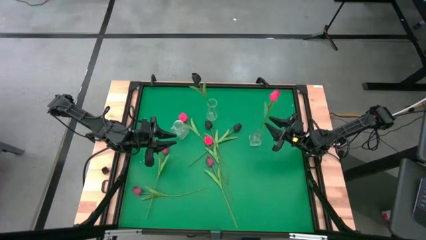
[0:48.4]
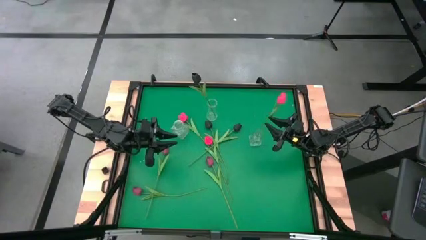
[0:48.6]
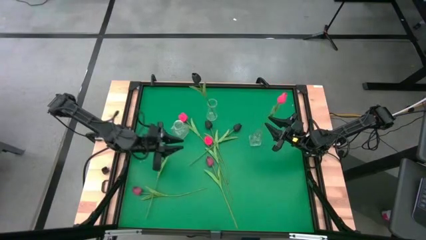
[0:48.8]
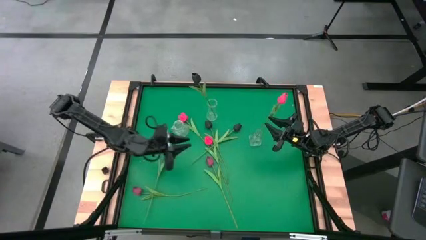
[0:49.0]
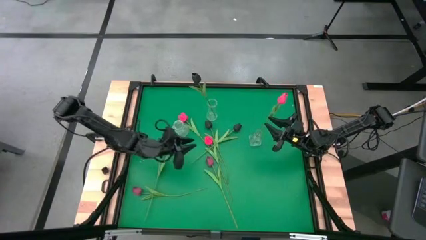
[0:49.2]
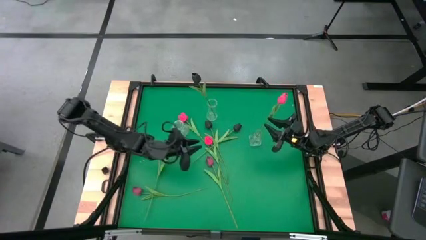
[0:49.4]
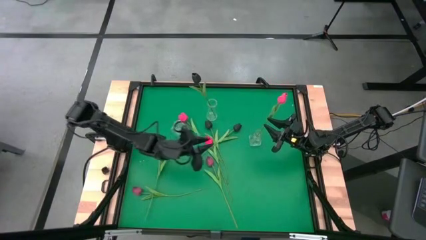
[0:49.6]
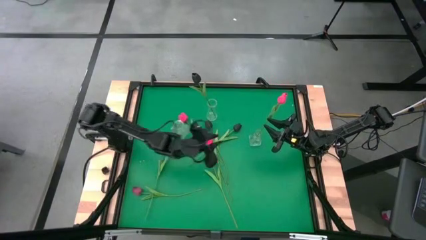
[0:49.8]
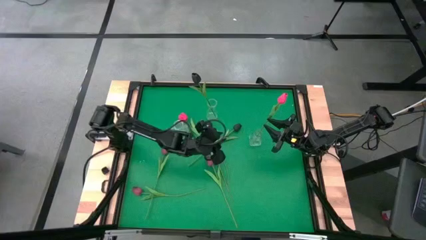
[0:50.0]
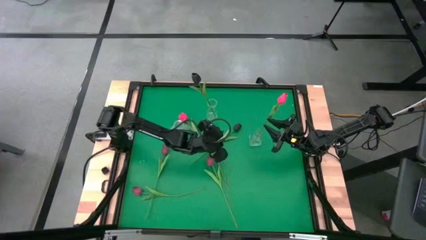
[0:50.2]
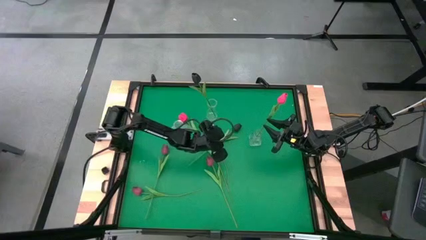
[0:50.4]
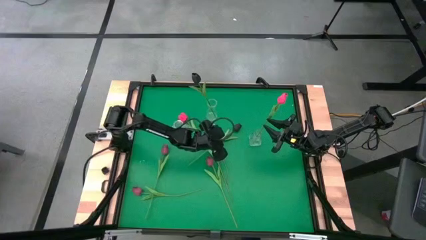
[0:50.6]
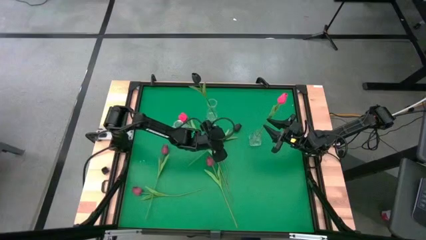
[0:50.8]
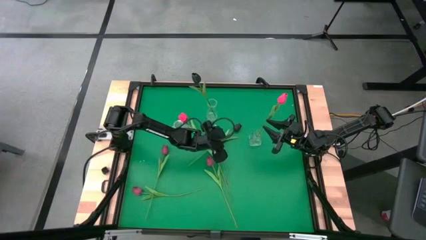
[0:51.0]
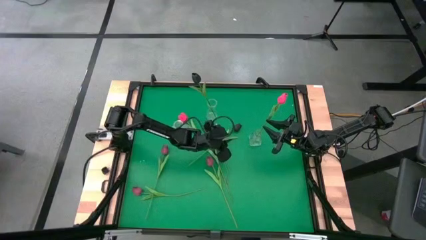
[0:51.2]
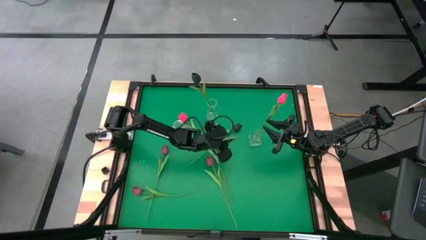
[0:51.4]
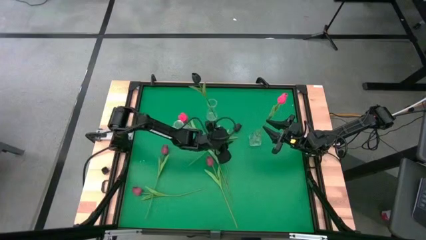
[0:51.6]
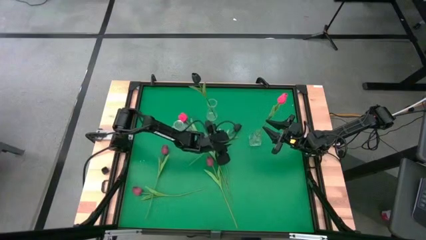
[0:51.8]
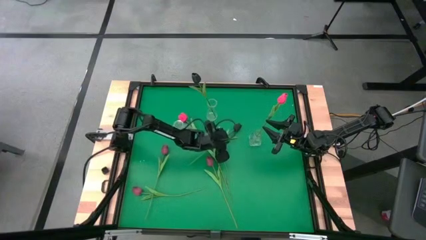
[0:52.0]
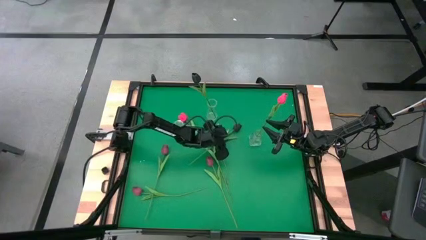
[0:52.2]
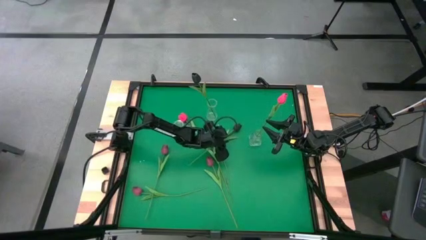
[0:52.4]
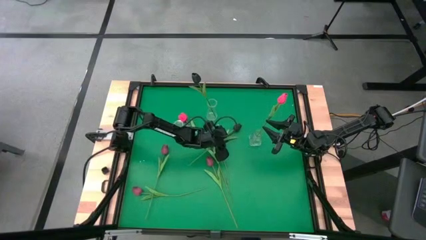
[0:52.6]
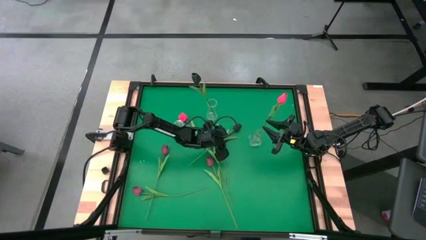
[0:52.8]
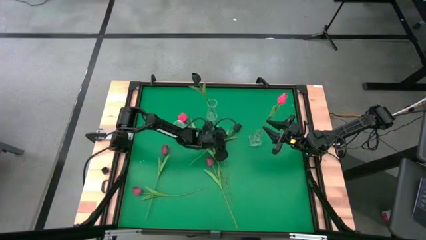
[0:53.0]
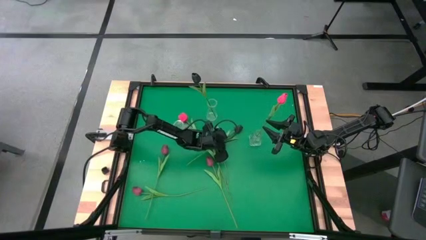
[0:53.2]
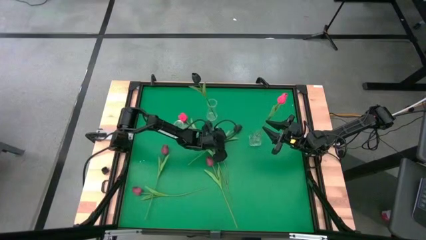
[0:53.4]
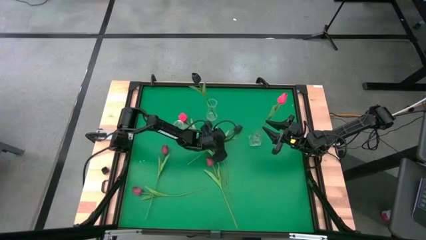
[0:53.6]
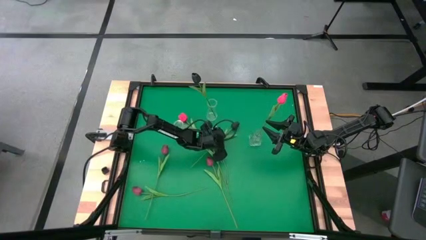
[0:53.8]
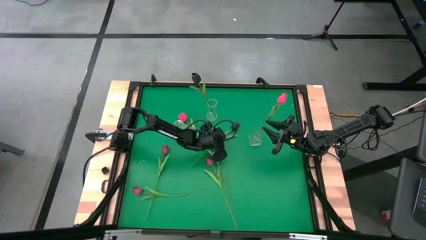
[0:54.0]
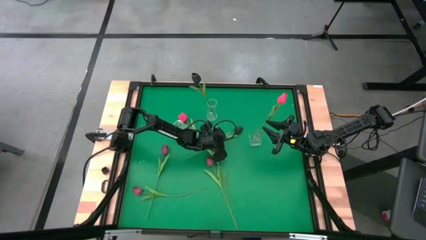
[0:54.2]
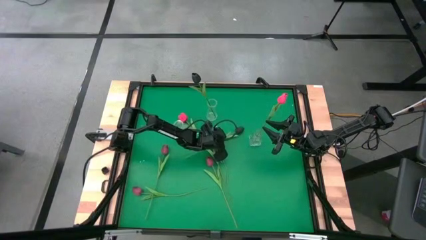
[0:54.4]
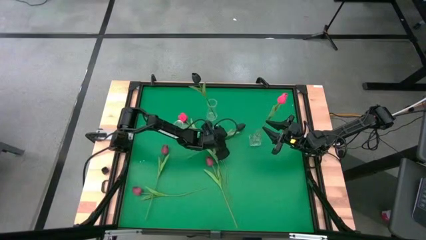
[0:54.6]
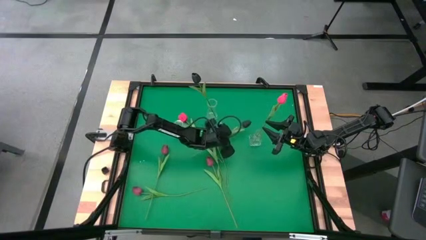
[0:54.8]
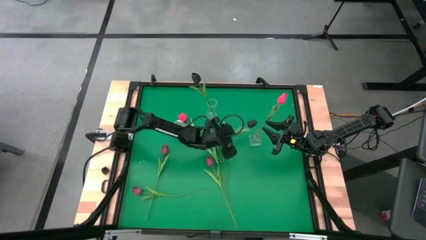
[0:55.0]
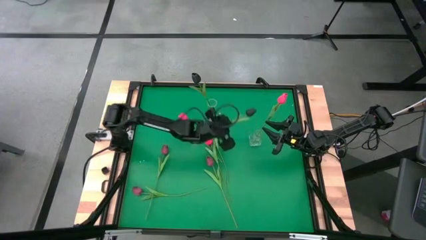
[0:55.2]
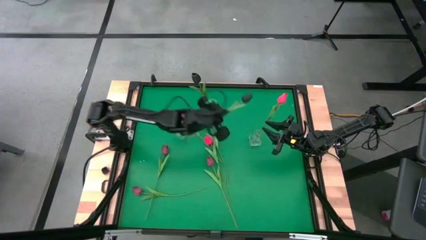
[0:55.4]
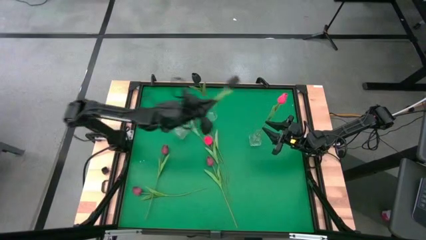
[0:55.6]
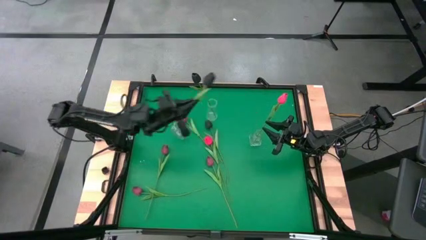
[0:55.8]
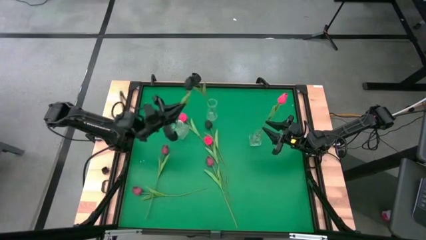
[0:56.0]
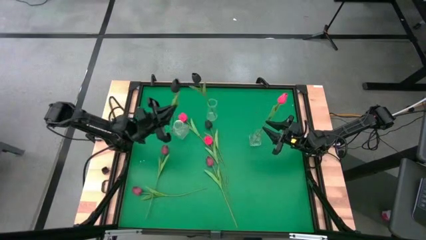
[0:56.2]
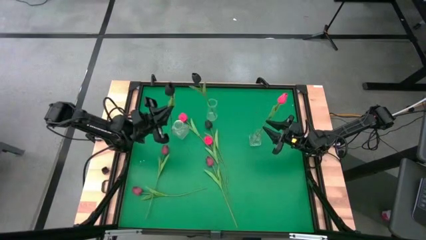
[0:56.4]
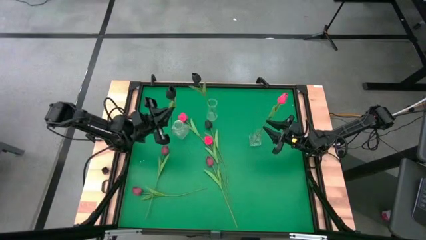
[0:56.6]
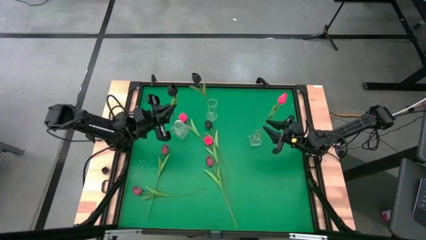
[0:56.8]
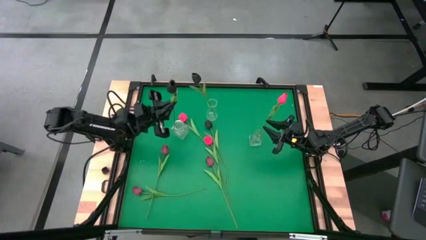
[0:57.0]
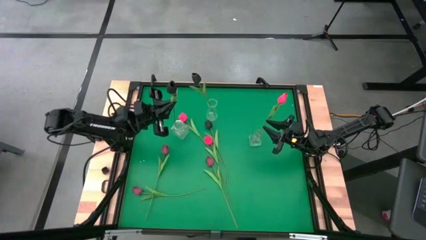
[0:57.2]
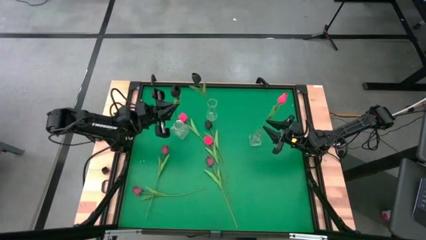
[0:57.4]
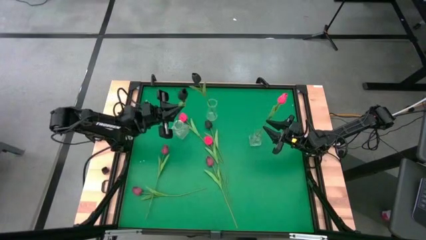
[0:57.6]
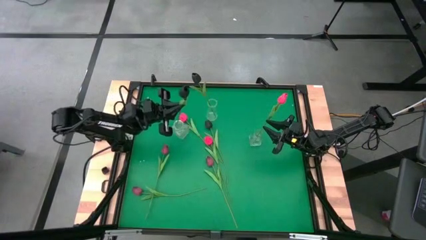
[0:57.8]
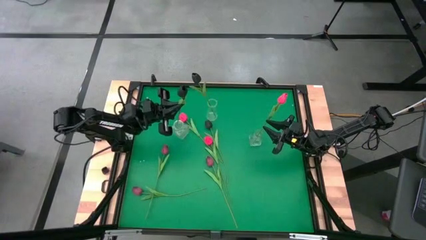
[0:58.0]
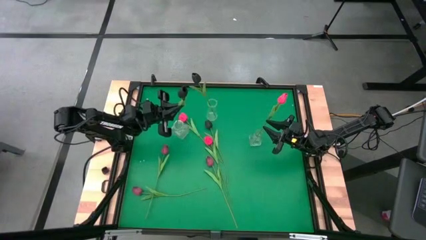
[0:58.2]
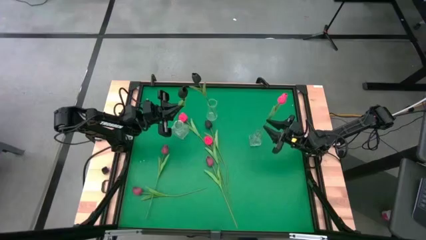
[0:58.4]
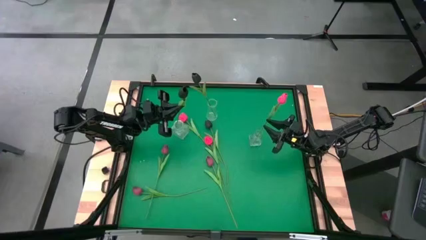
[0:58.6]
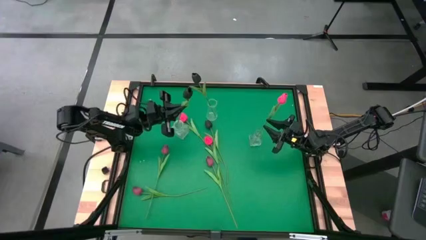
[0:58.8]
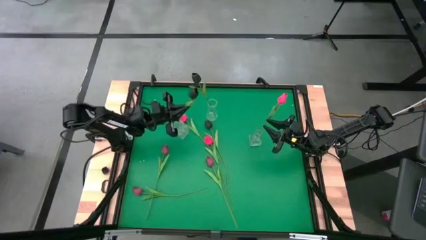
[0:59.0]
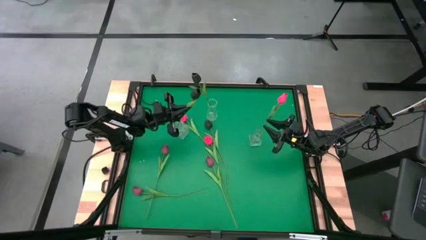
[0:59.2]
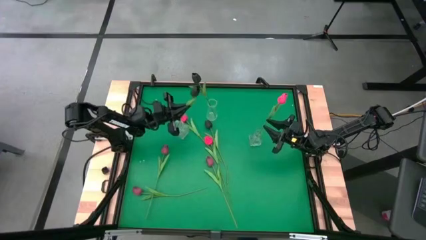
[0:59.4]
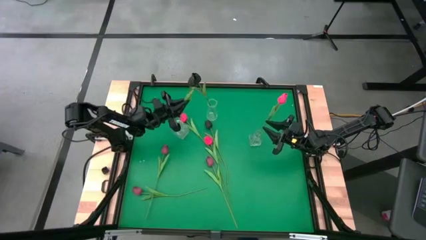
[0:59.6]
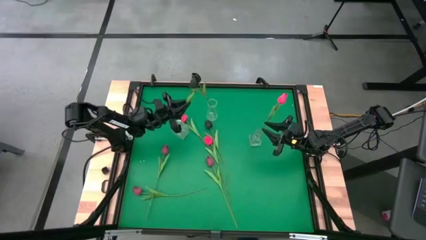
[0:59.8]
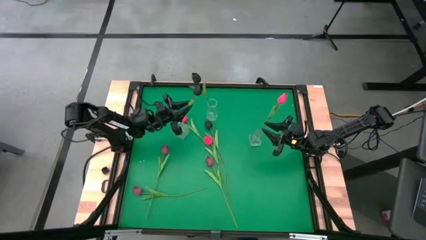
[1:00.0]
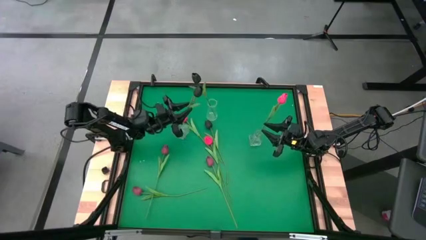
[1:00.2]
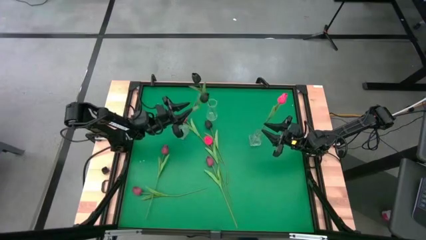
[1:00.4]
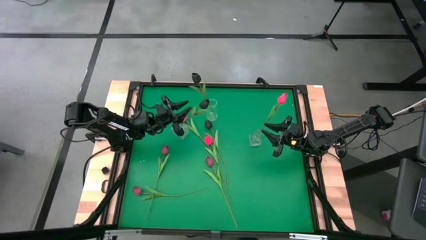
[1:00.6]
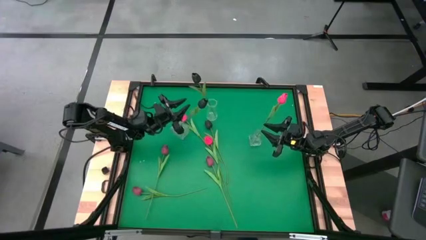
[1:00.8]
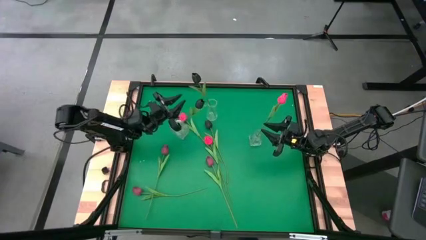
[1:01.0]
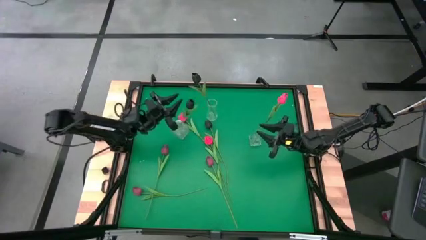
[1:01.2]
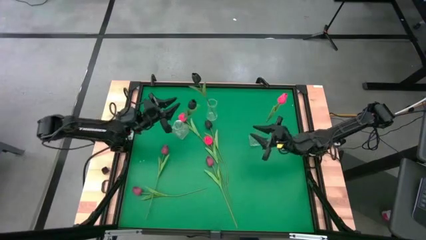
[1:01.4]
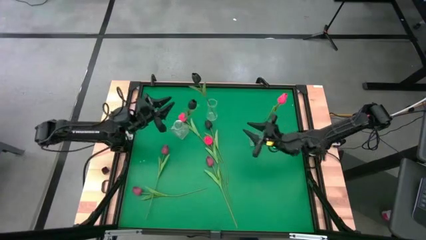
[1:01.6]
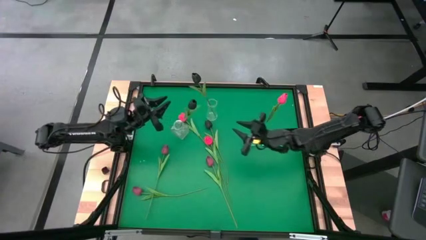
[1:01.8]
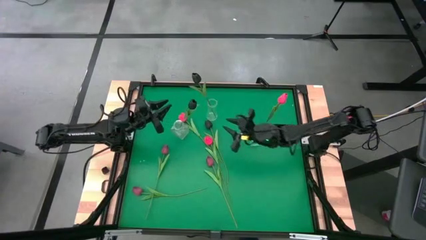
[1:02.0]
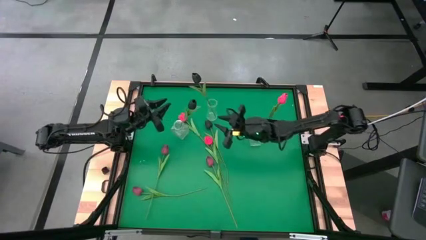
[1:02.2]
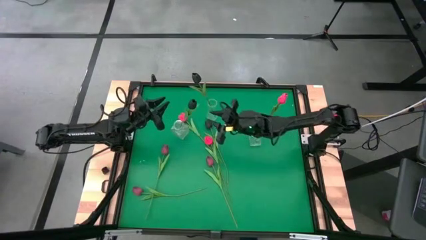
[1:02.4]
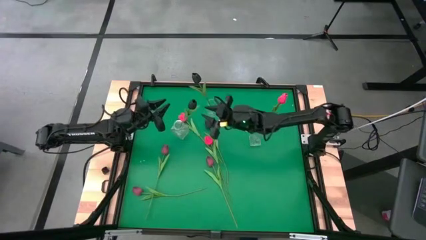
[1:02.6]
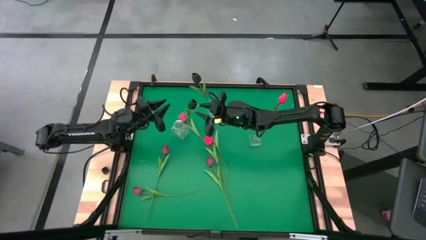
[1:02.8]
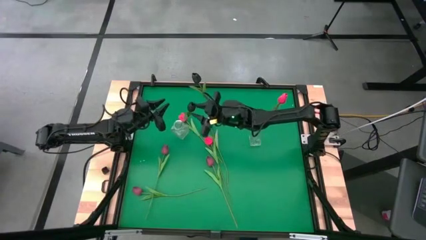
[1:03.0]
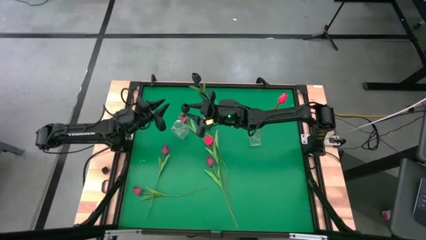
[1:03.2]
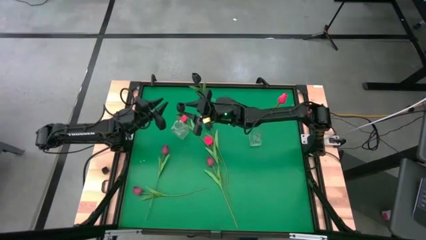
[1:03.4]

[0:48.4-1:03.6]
Task: Sort flowers into vase by color
Put the right black tulip into the bottom left transparent vase
